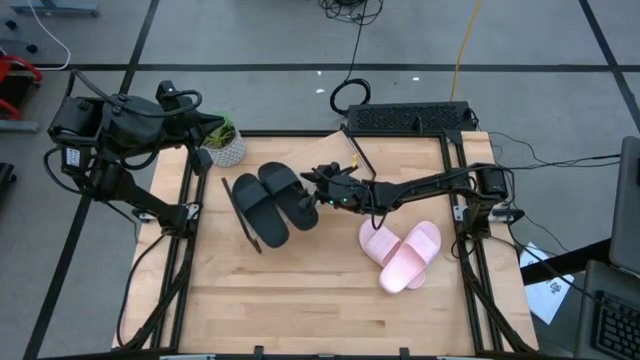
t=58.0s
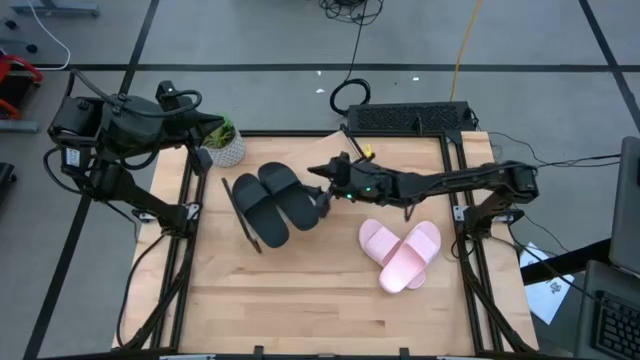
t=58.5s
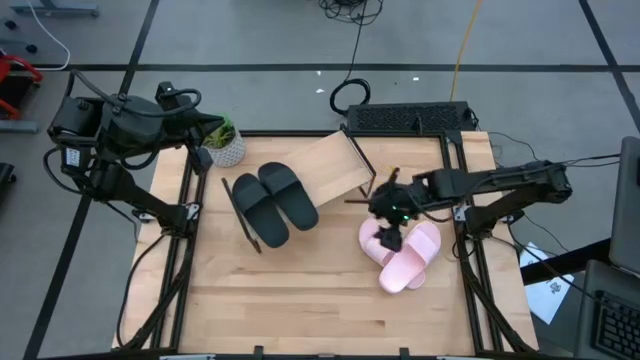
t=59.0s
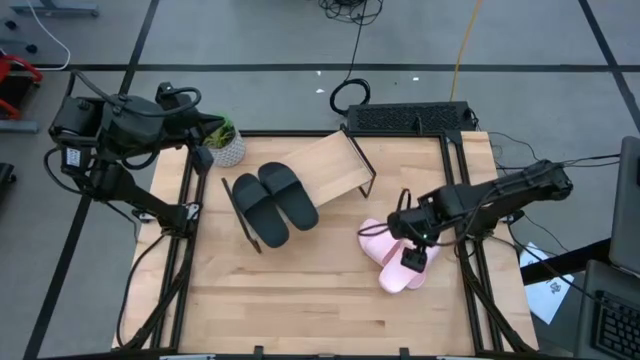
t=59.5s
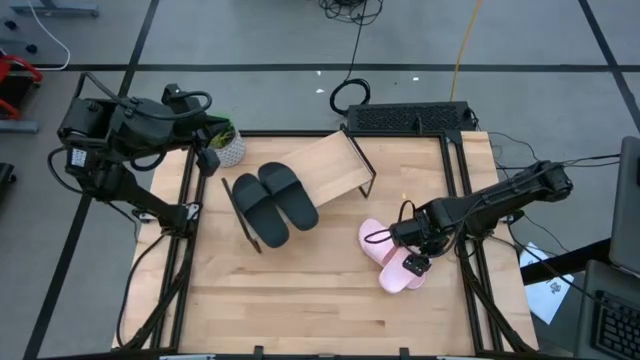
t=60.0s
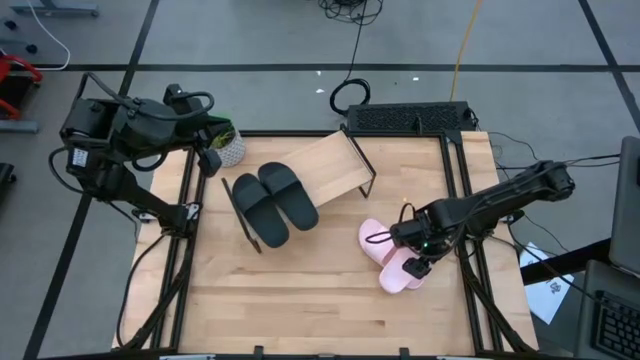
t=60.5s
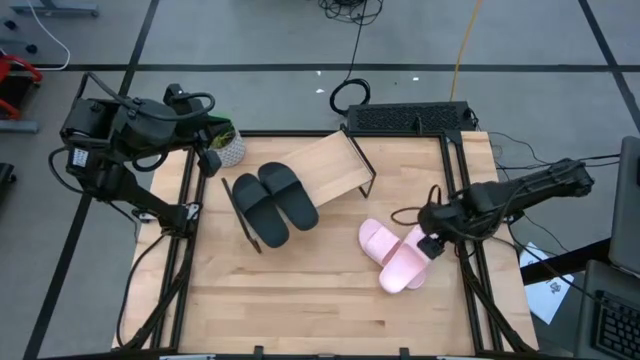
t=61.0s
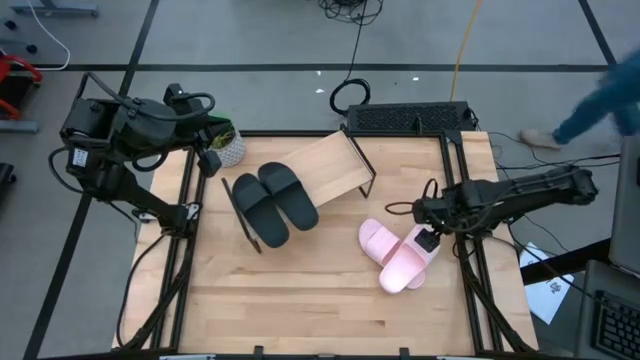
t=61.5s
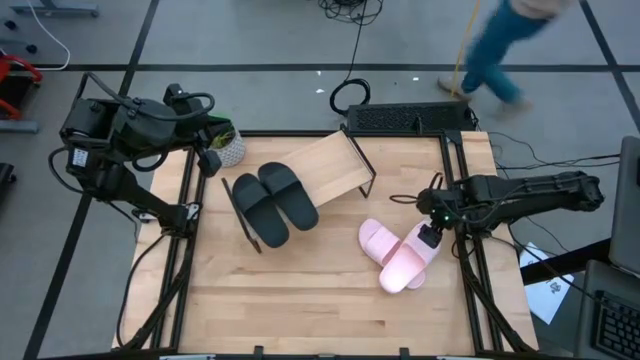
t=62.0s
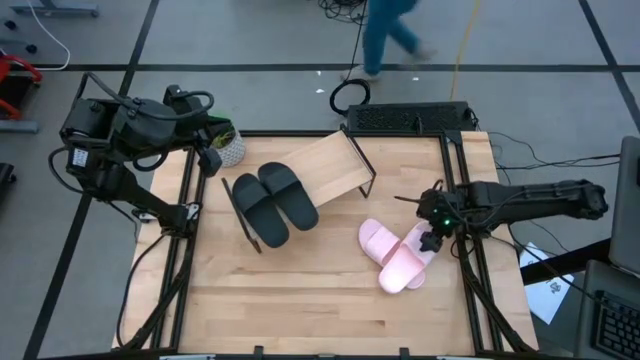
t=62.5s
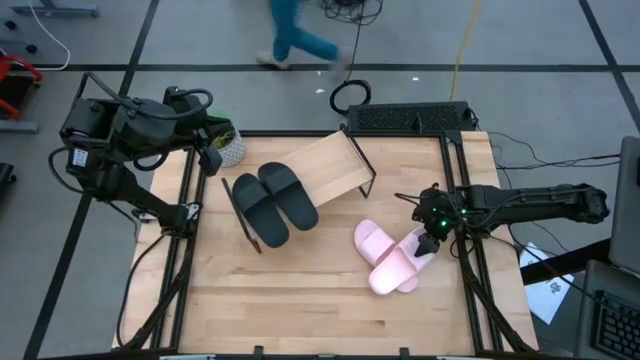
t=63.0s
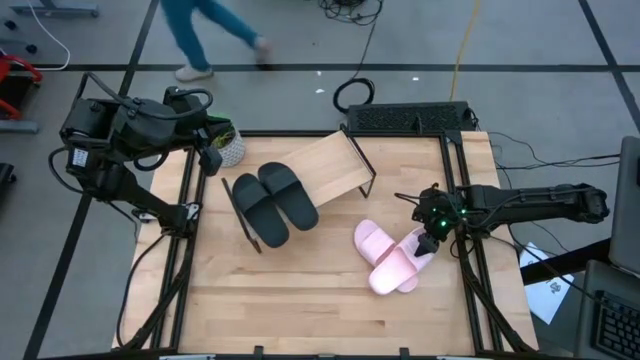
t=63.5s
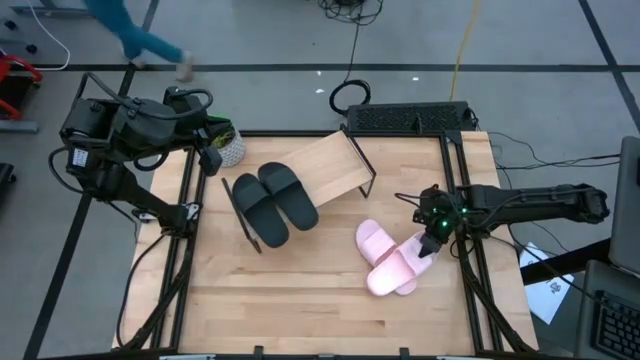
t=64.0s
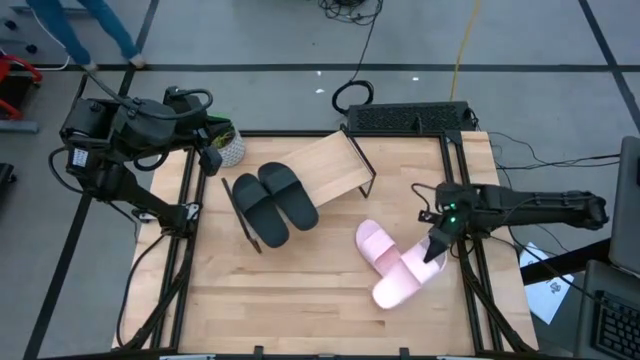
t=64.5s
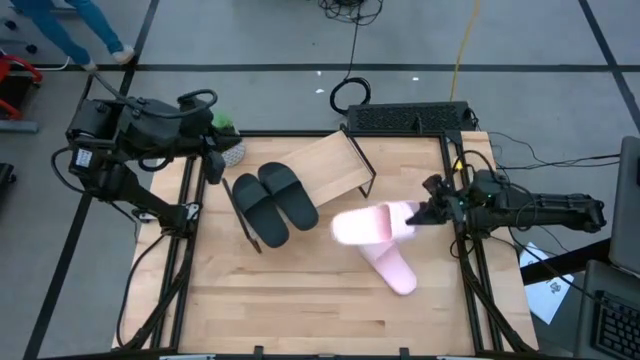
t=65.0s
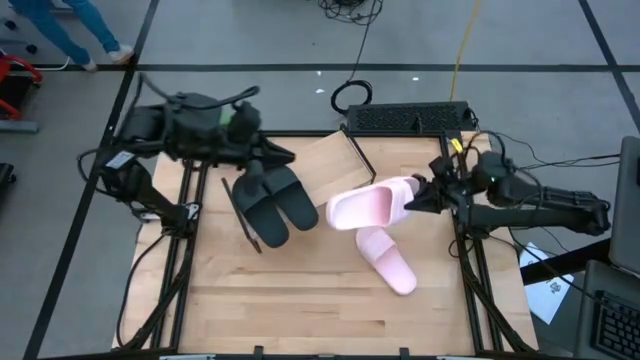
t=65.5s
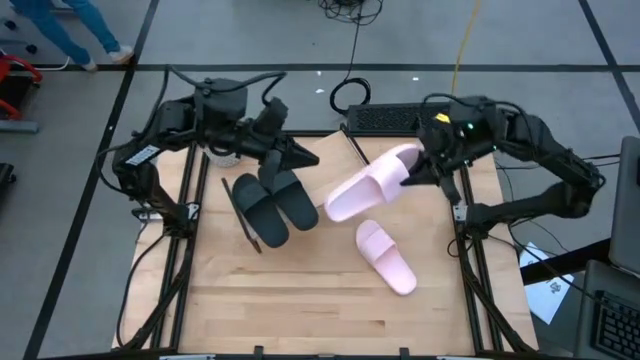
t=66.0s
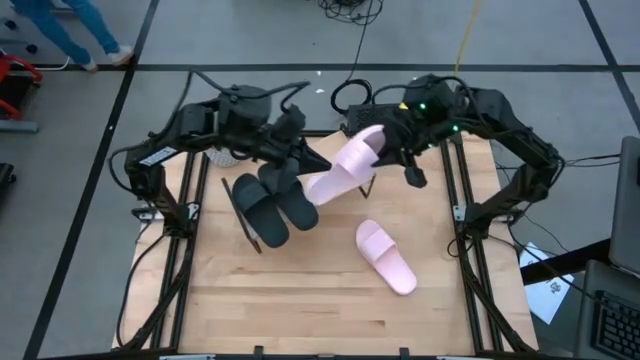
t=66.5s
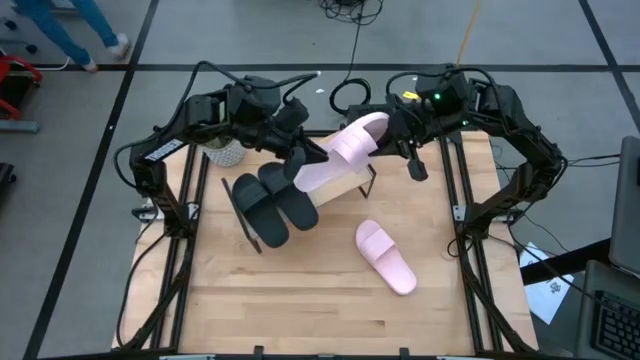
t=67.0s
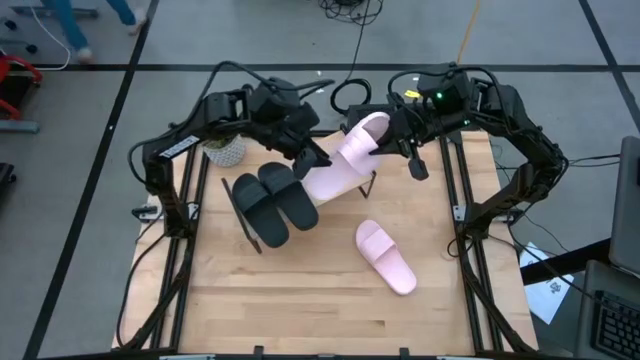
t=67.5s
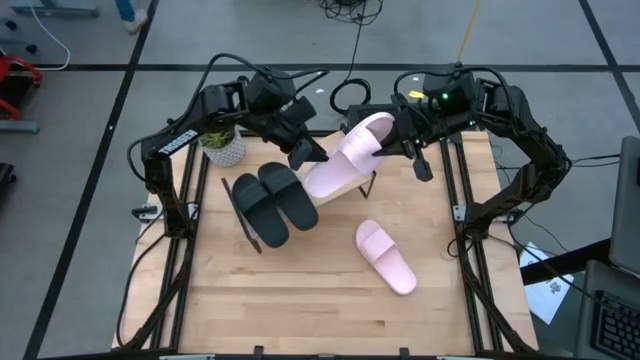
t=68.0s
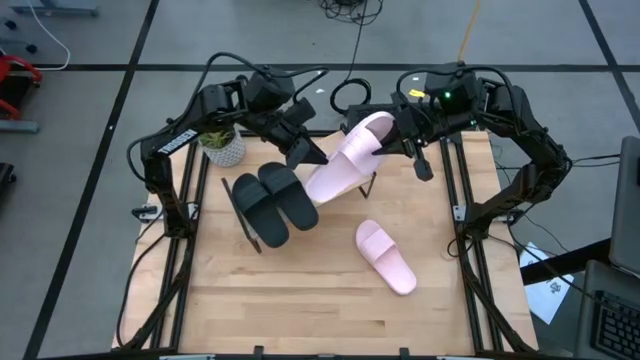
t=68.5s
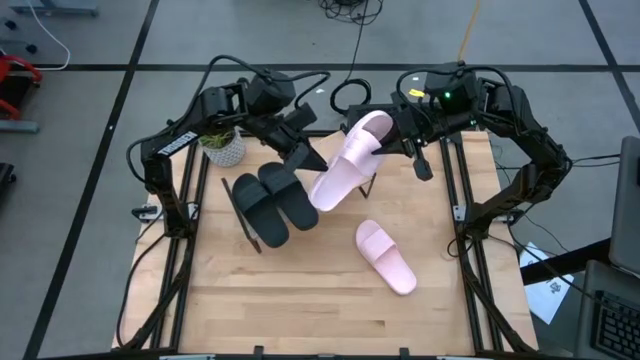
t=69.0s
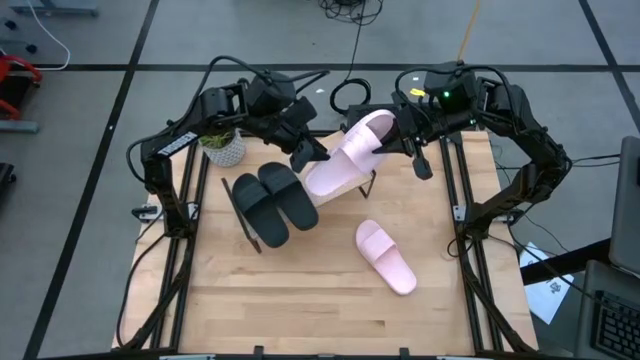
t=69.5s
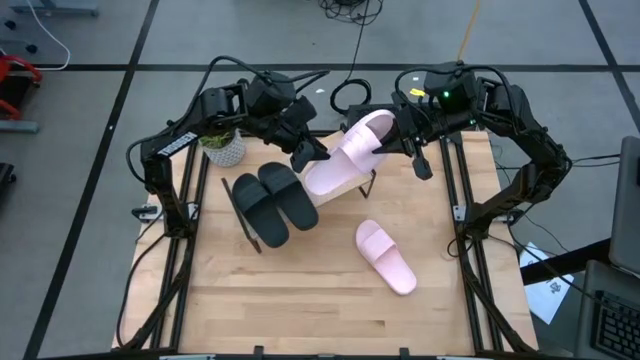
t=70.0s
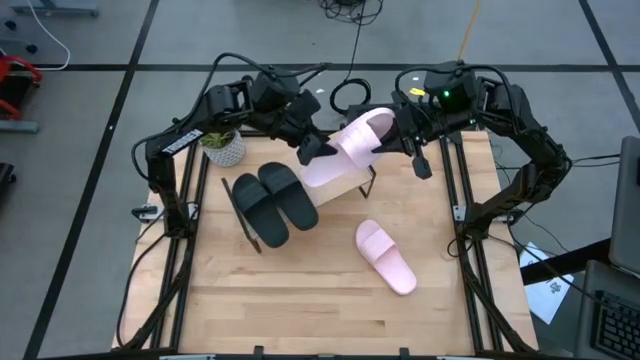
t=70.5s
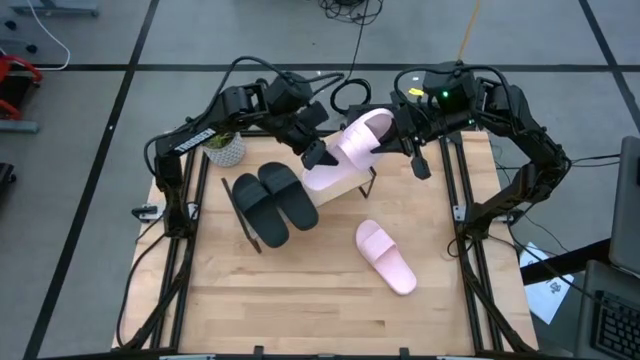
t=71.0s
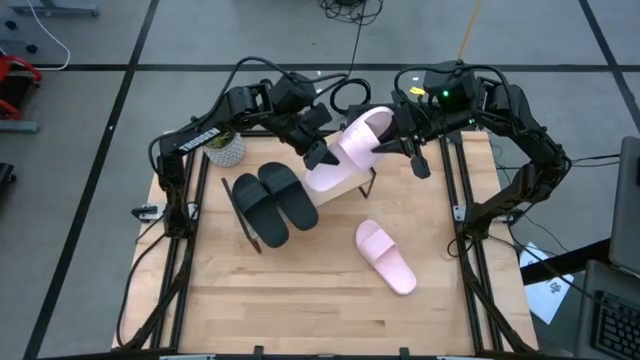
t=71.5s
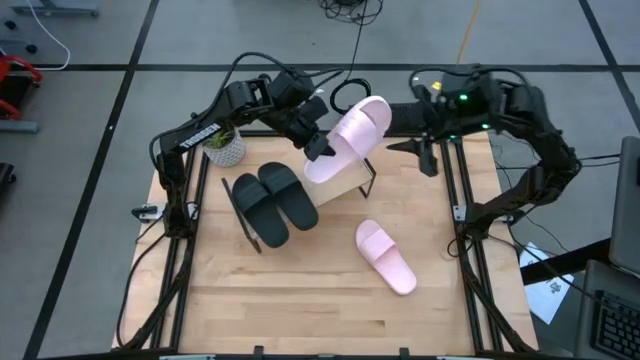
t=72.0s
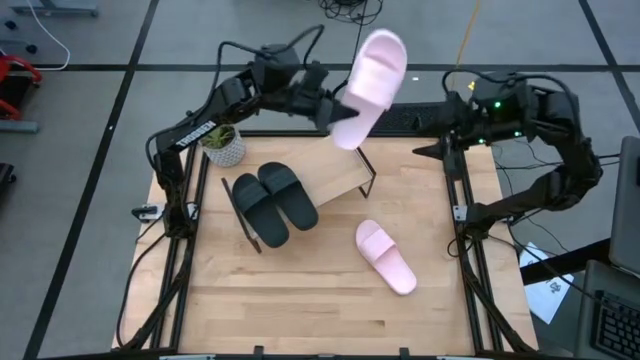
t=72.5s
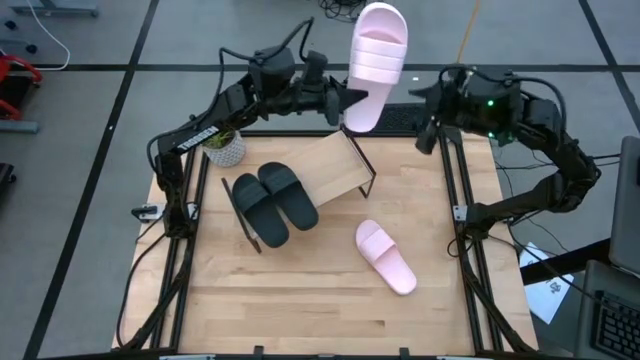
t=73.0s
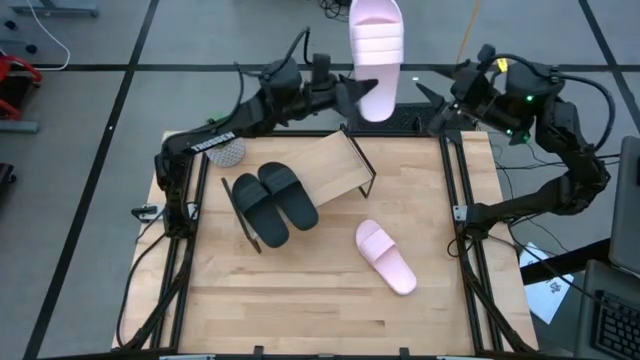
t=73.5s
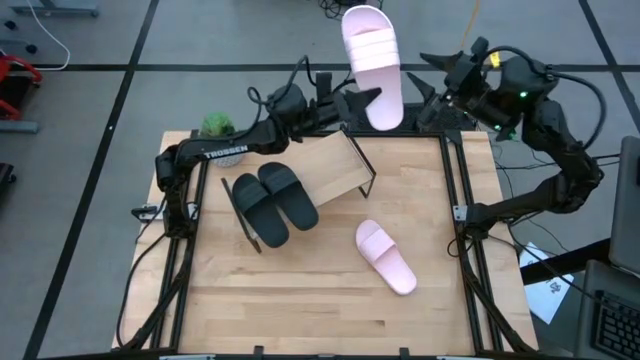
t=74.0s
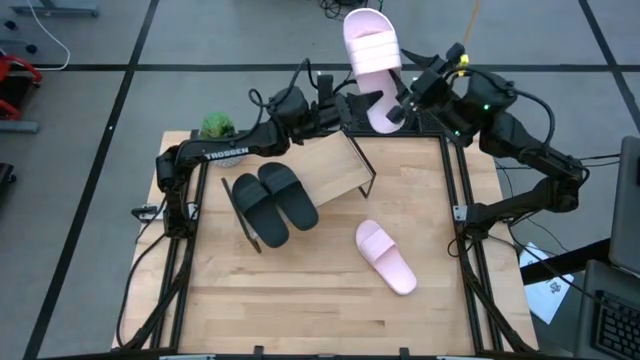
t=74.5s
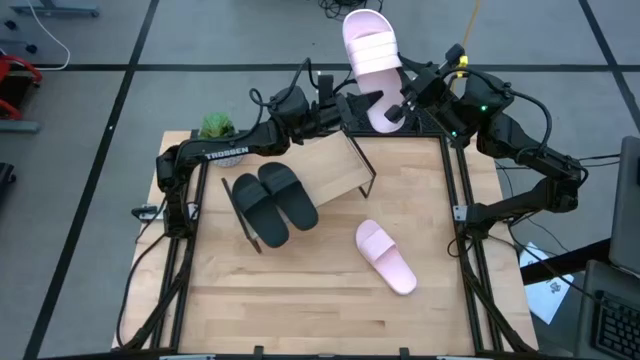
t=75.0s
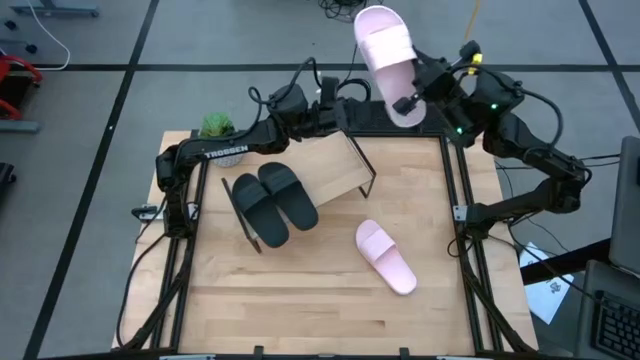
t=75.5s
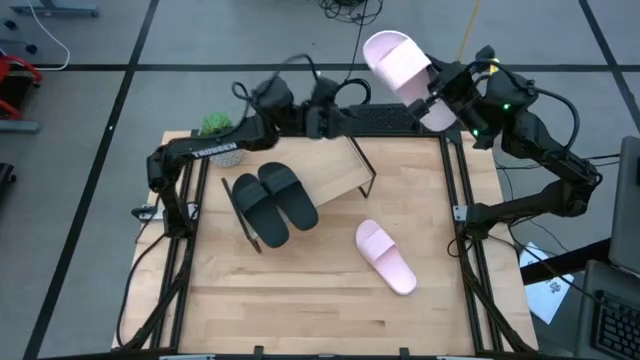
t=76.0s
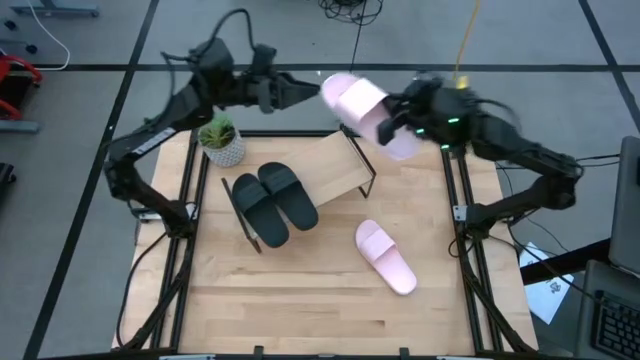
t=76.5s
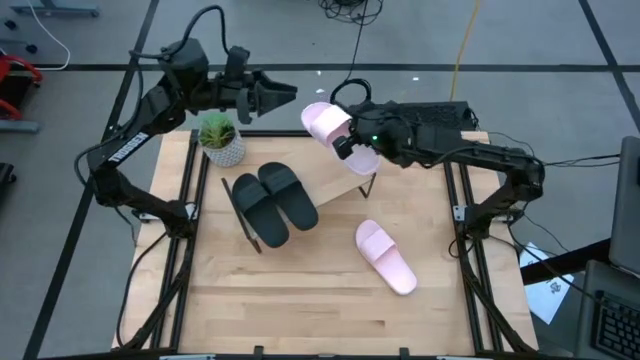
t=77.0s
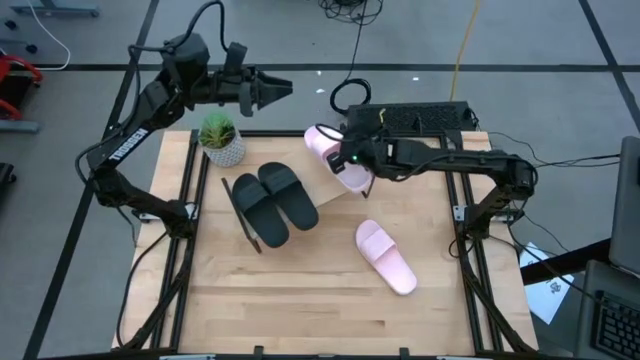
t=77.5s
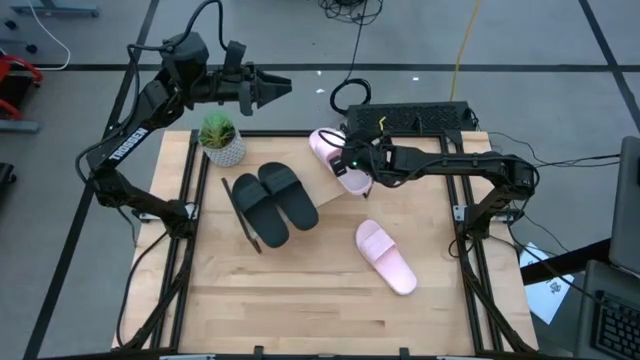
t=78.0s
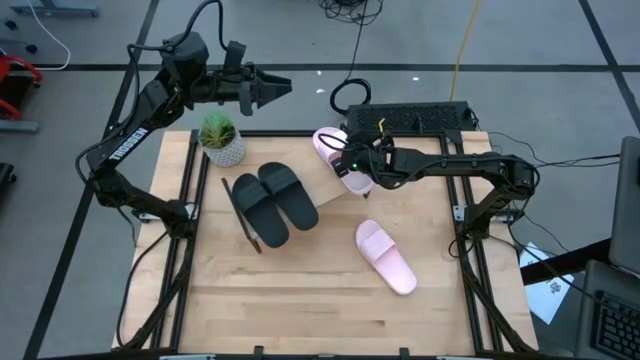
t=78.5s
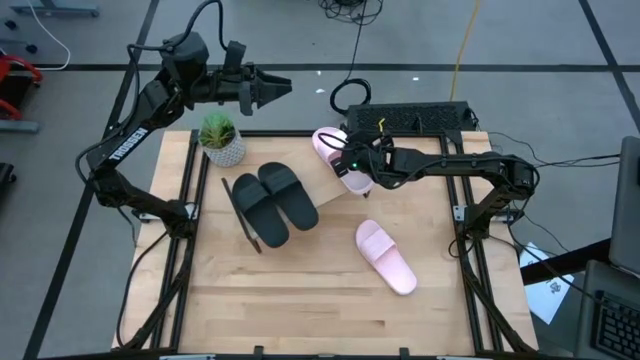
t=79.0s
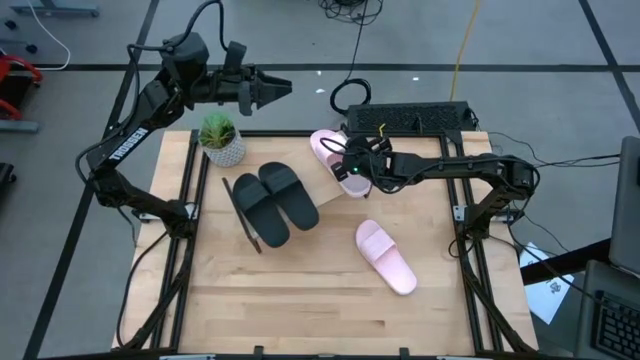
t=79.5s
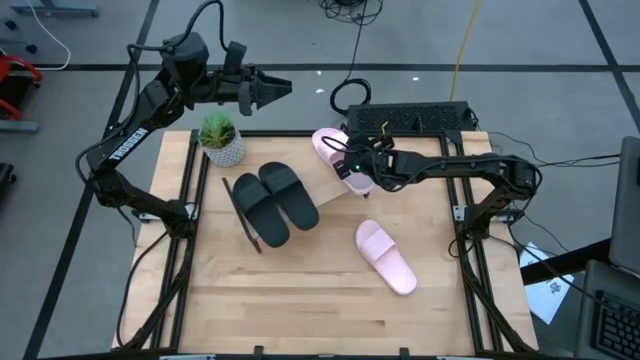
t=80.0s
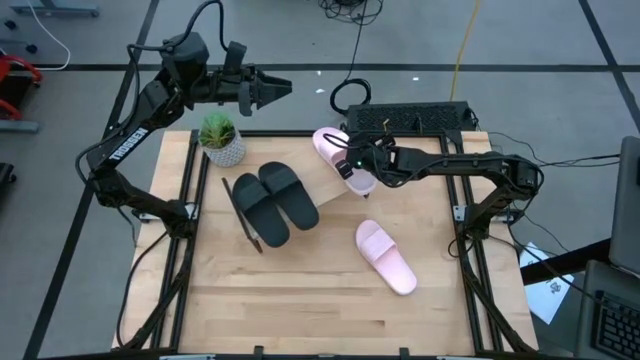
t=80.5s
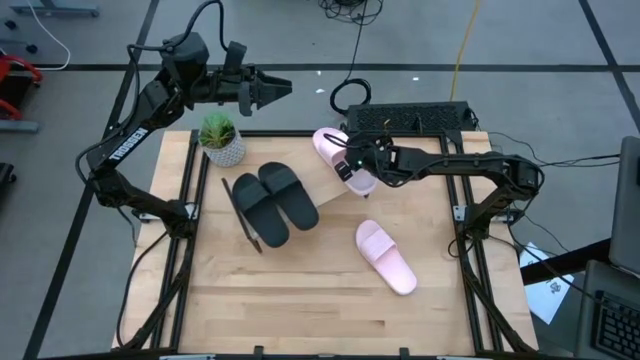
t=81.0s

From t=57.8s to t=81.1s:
Task: Pick and place slides into the shelf
Put the top pink slide on the shelf
